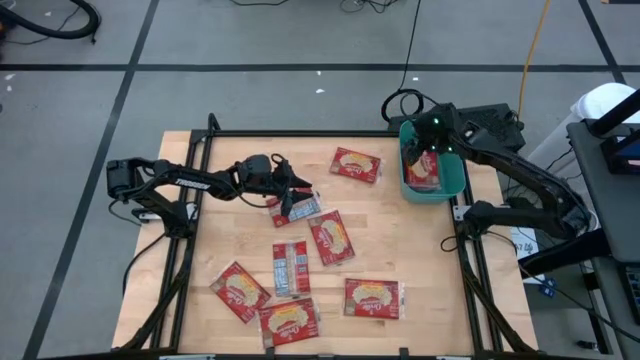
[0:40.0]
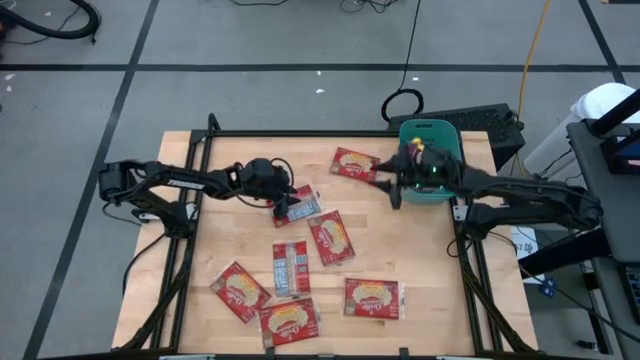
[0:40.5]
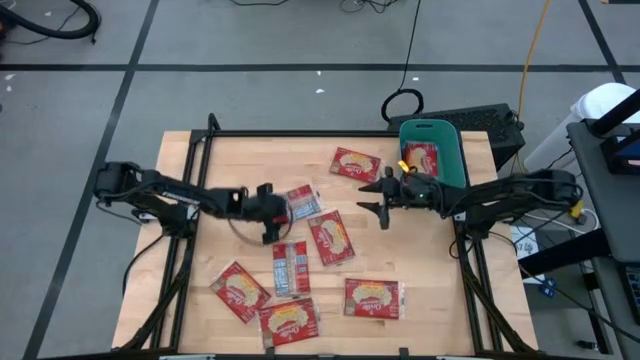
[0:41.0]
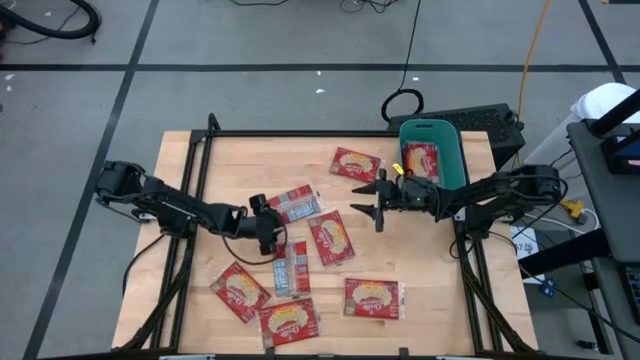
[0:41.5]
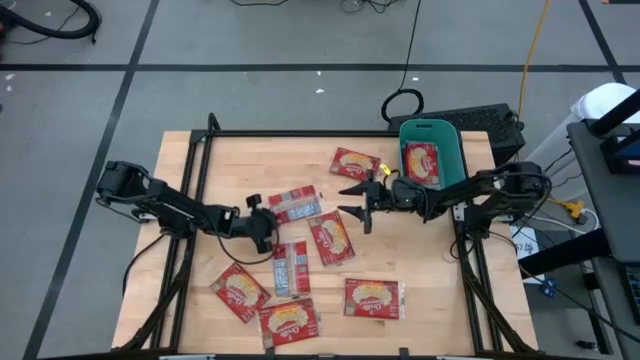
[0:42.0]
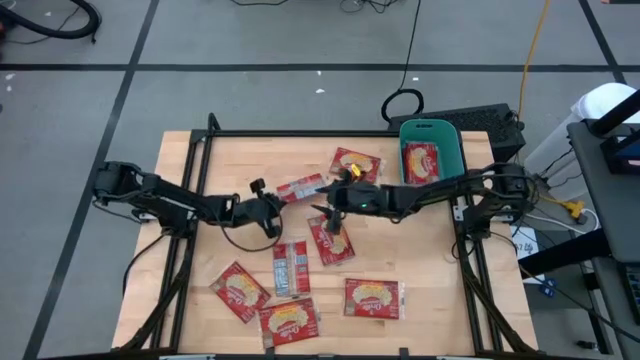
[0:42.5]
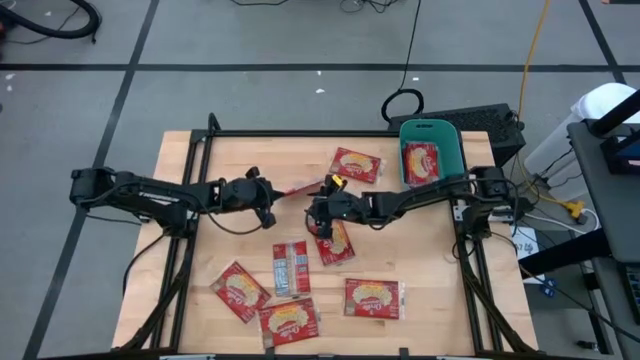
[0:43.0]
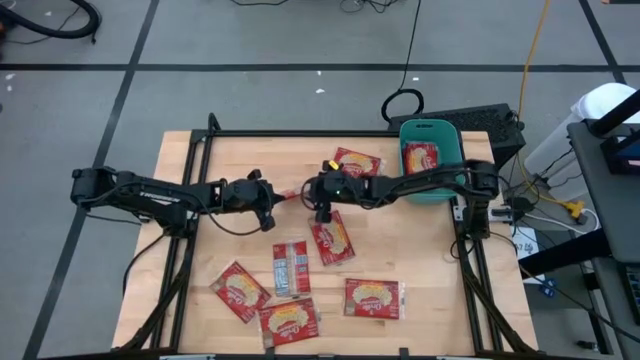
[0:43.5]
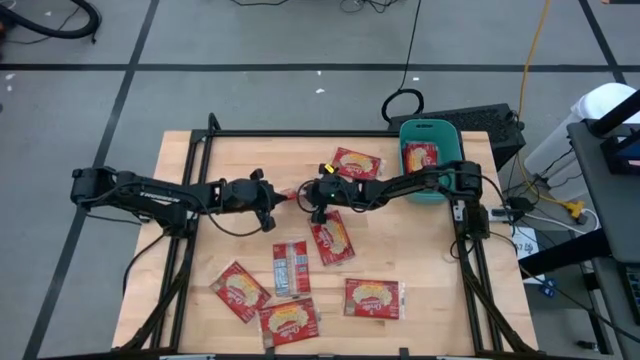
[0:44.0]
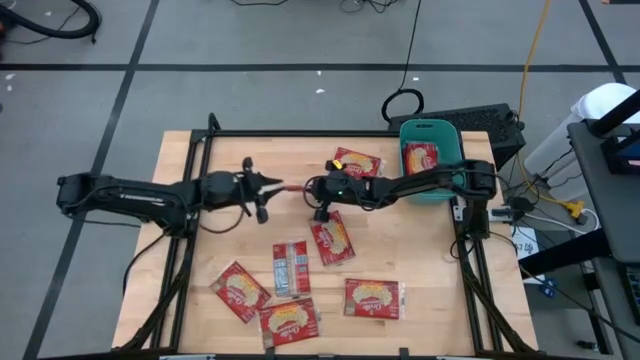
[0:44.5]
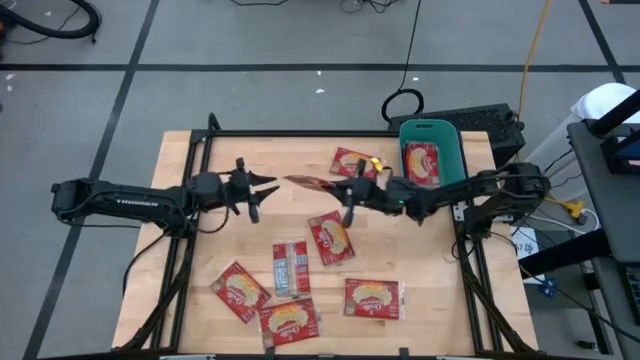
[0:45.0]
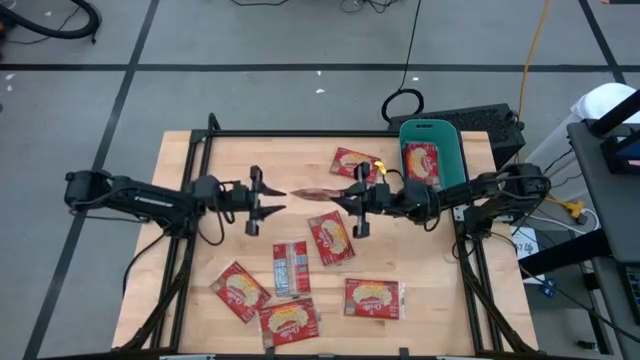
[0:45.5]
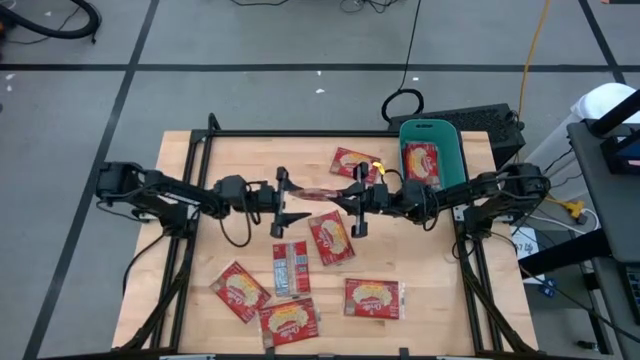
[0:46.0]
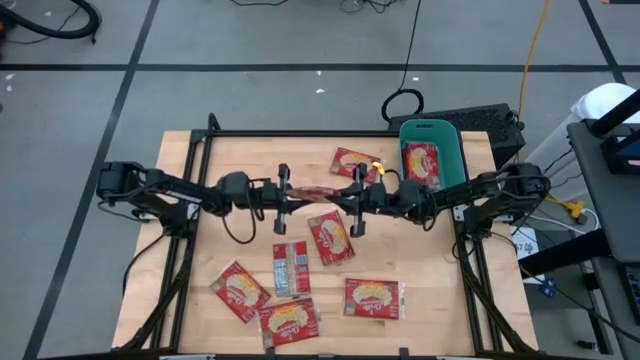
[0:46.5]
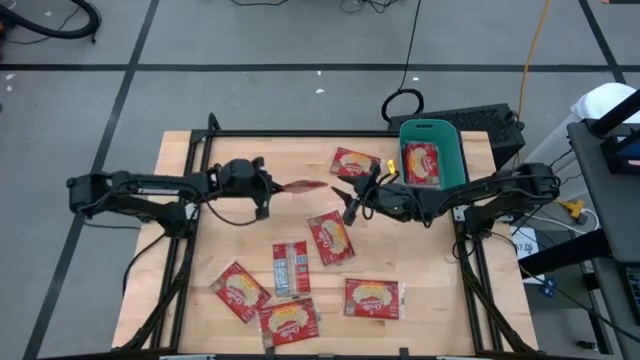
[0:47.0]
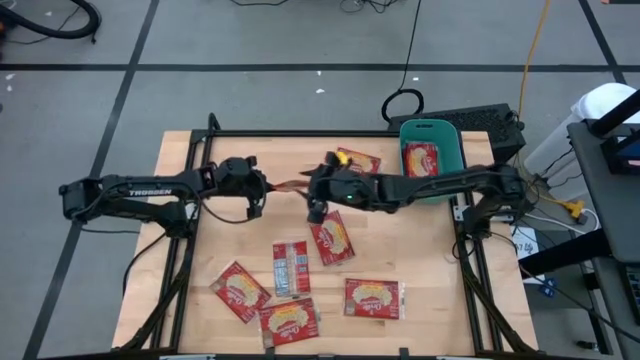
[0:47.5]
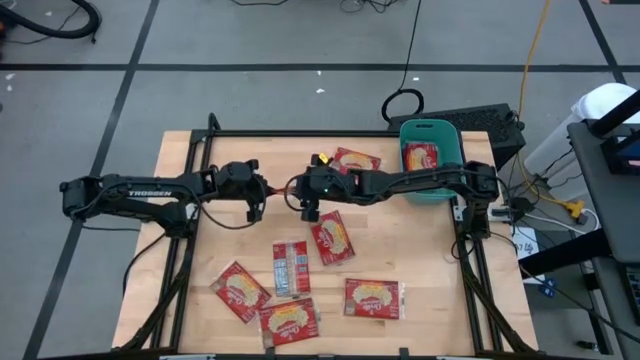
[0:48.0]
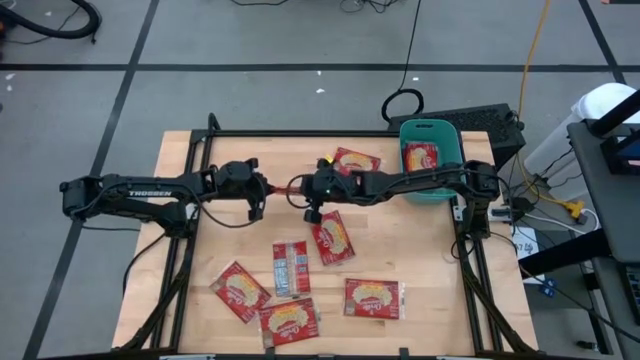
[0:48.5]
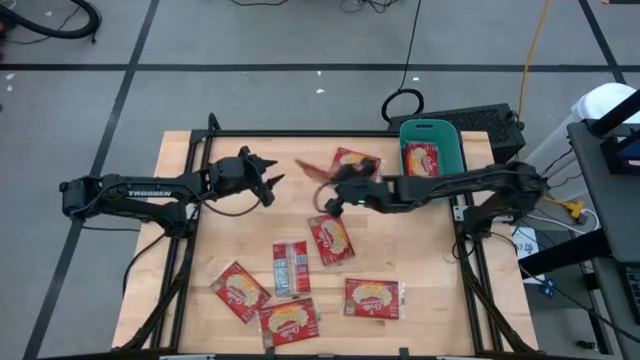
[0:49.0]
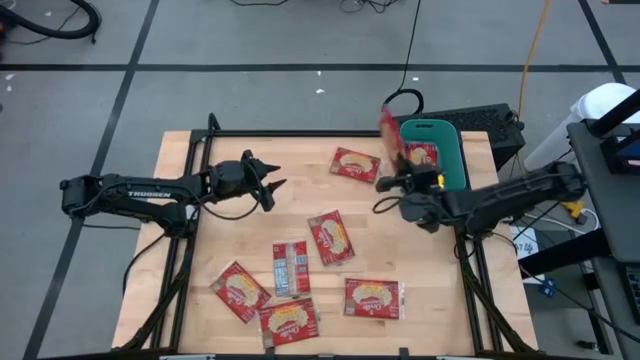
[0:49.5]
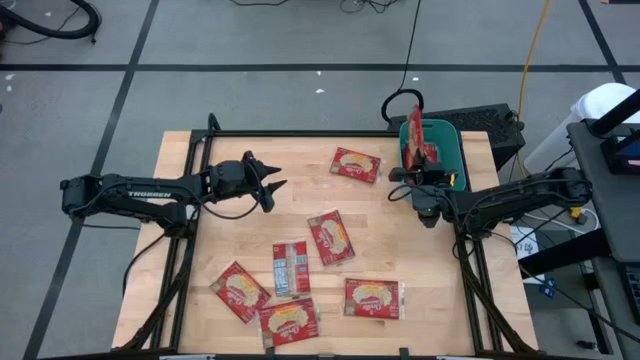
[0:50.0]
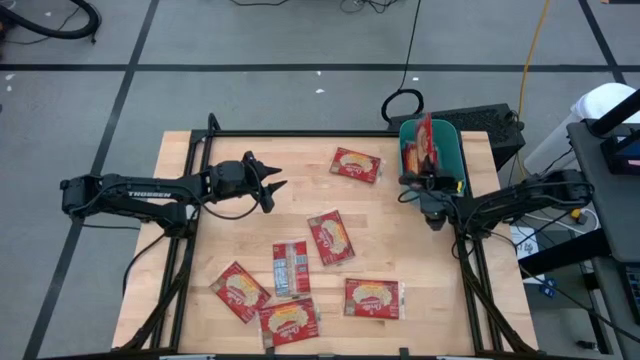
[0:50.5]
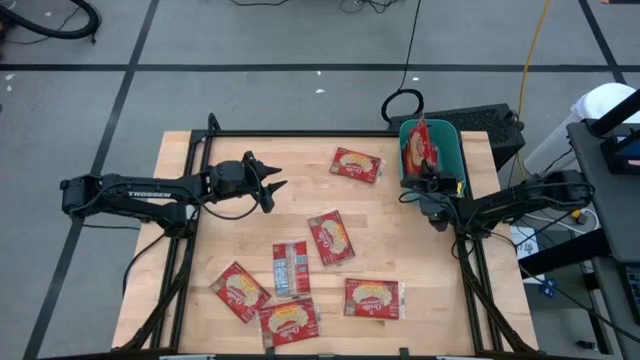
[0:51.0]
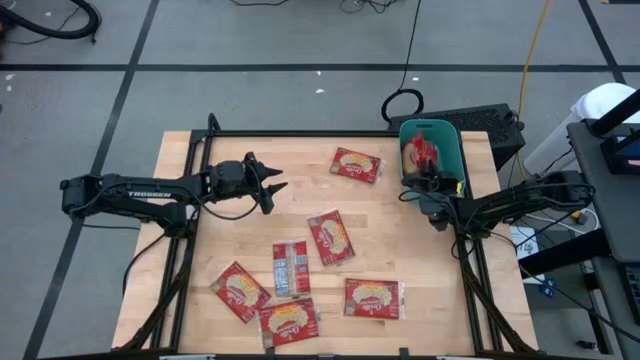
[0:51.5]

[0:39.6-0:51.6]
Task: Sort popcorn bags into baskets
Put the red popcorn bag into the green bin

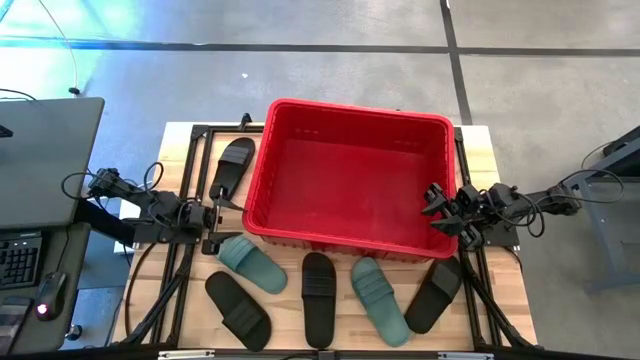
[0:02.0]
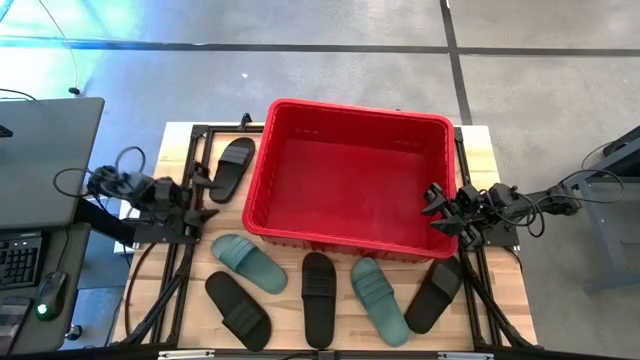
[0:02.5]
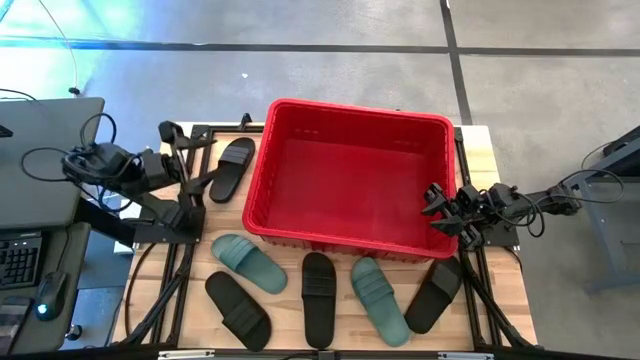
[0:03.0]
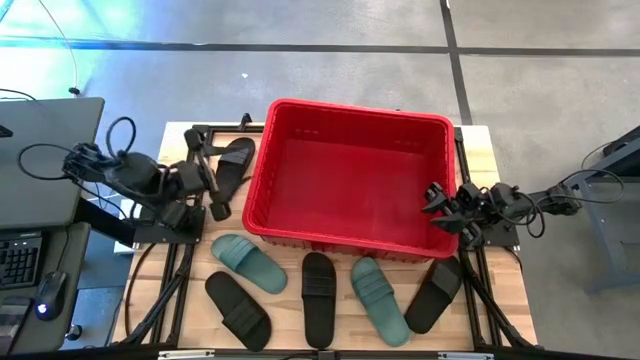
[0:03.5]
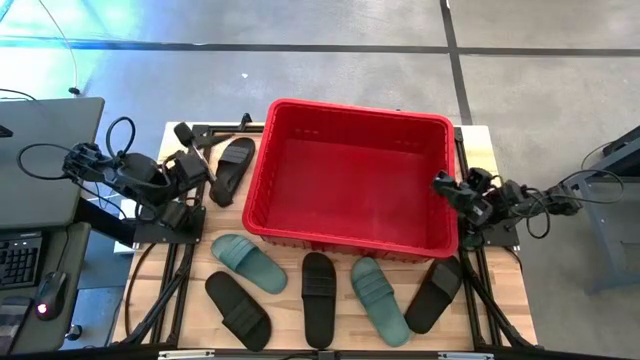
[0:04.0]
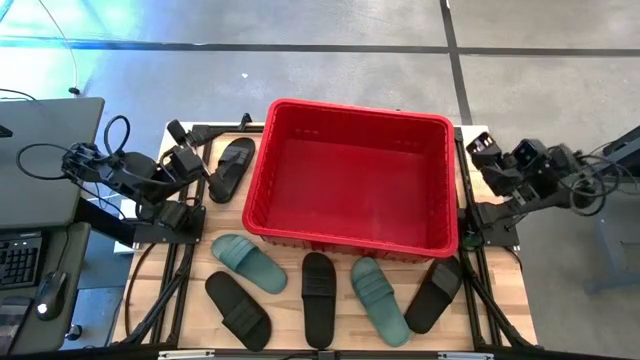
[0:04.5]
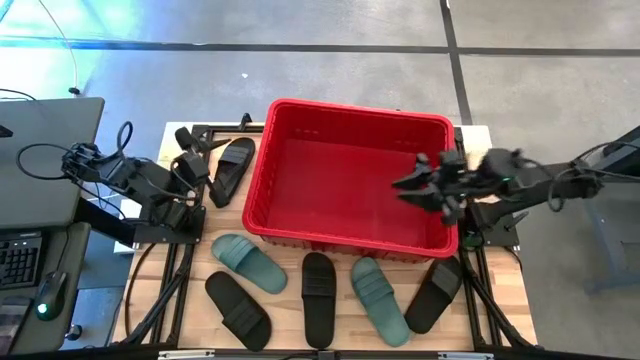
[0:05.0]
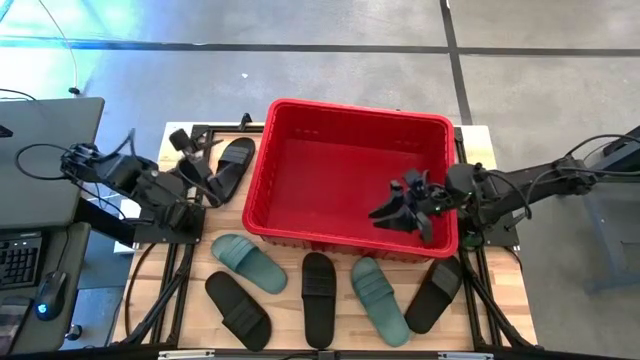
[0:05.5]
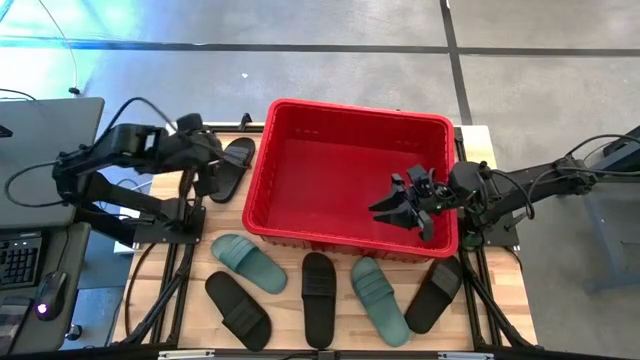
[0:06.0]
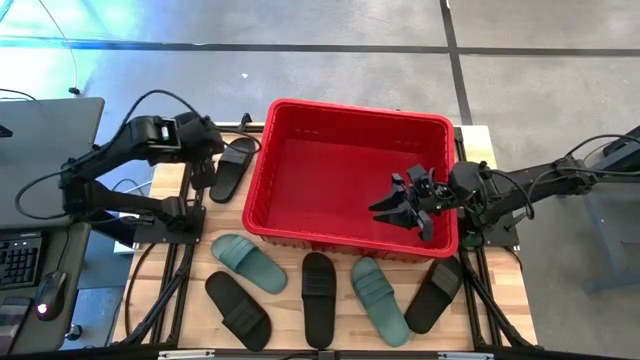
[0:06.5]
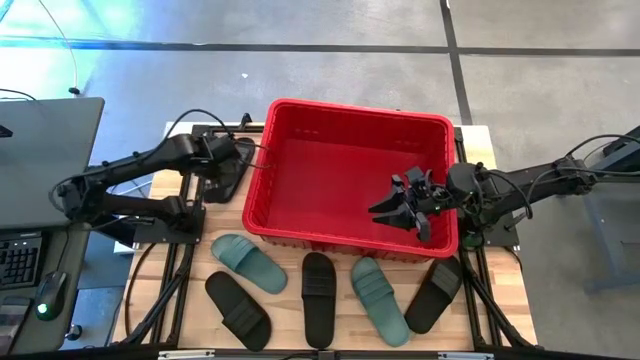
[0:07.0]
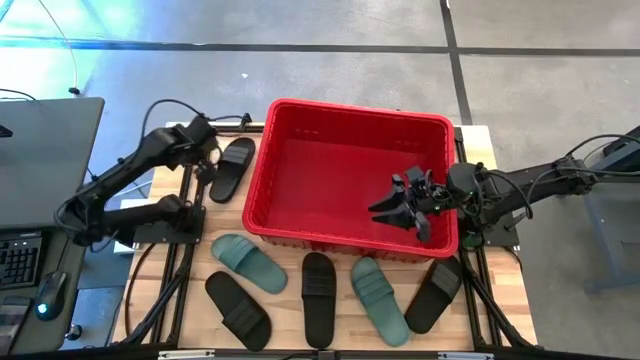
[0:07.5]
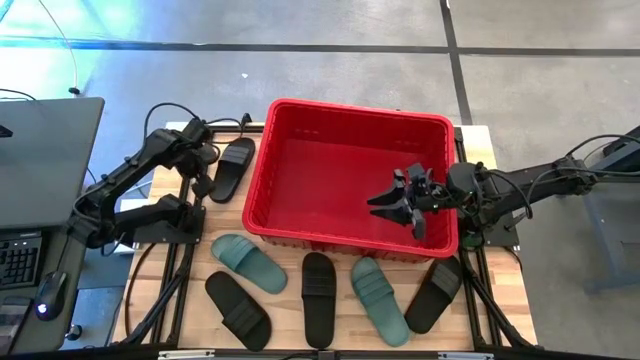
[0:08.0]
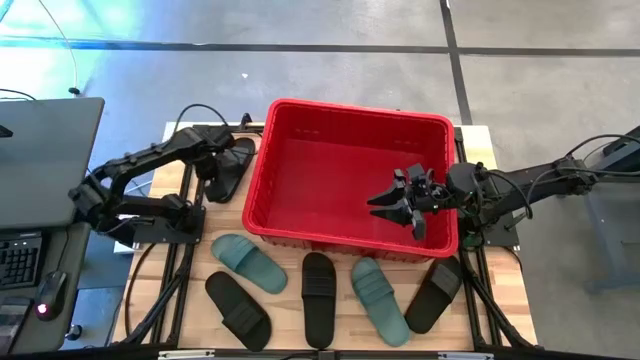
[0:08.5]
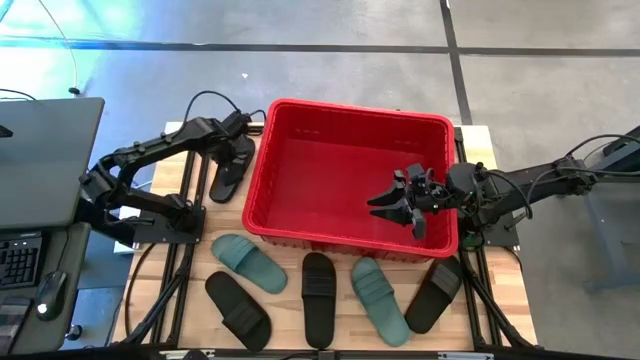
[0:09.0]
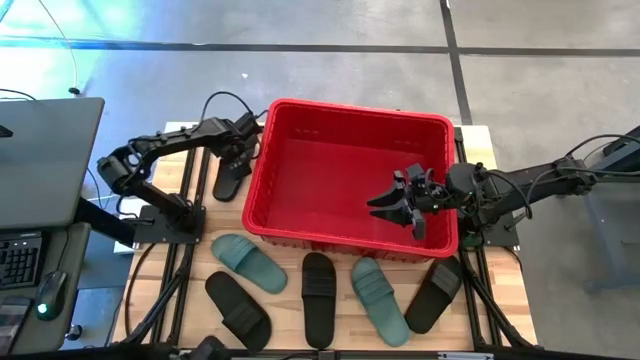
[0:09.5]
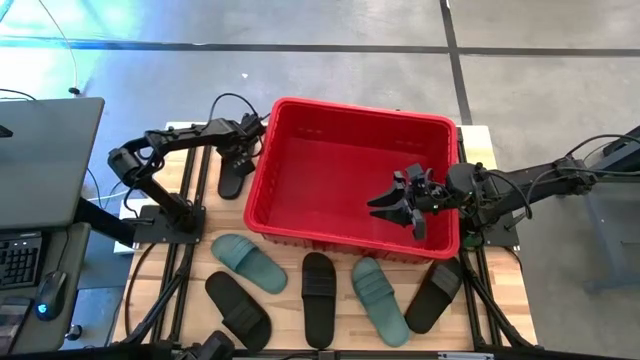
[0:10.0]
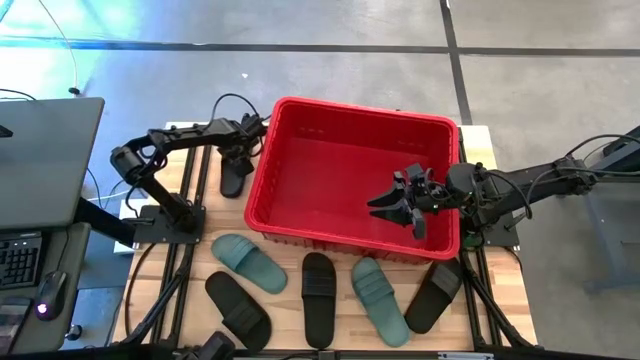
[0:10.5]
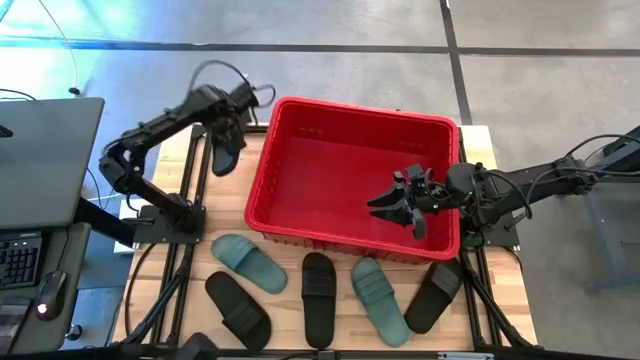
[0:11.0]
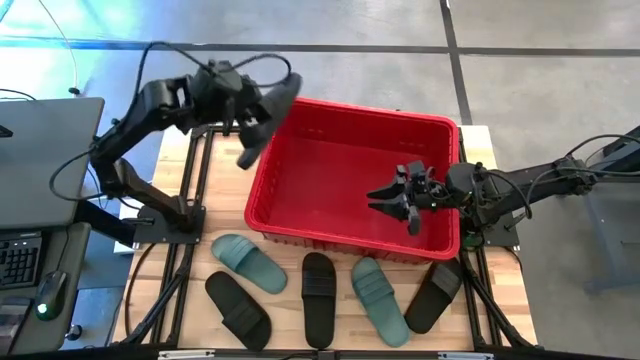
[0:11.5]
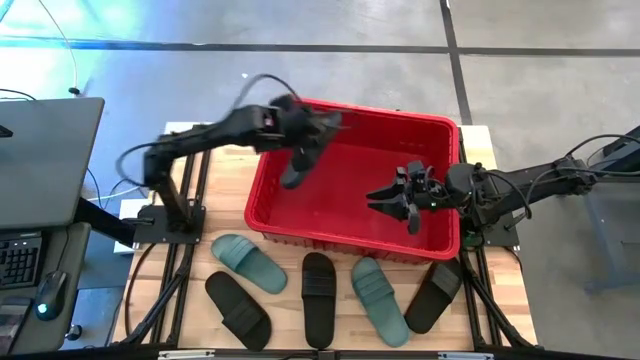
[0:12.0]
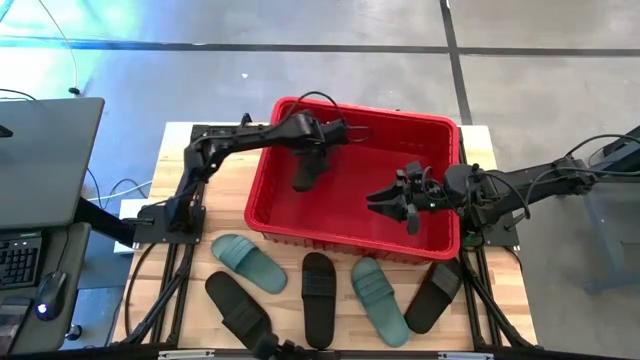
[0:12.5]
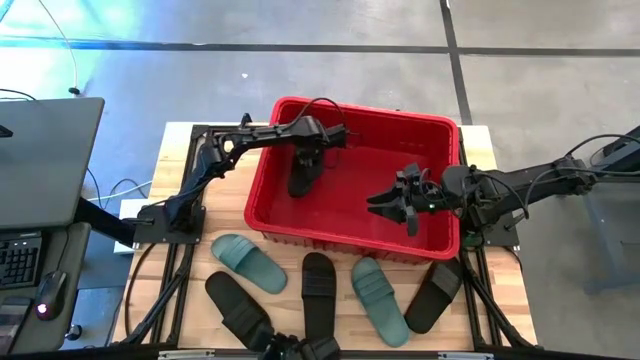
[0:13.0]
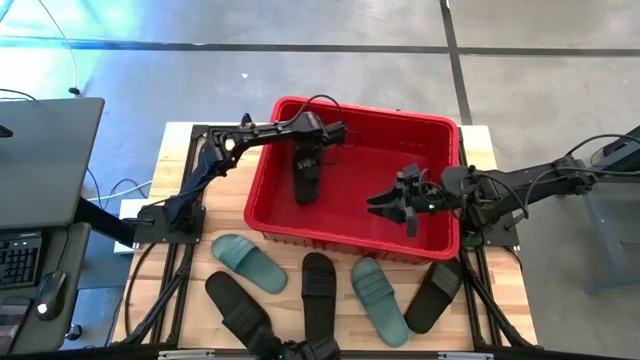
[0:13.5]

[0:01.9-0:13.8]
Task: Pick and place slides into bin
Put the black slide into the red bin
